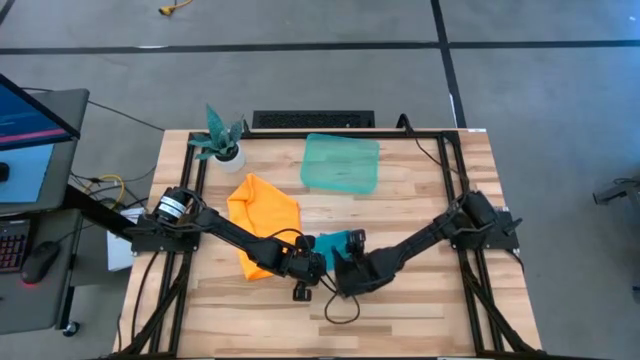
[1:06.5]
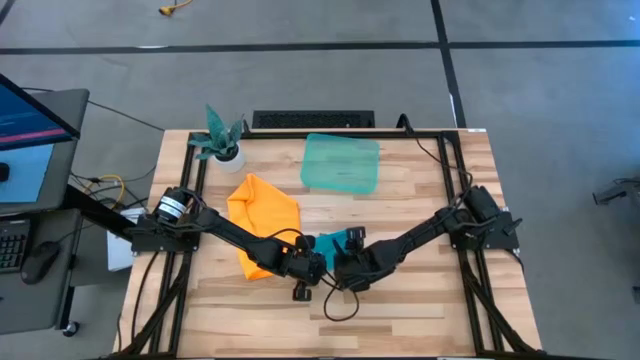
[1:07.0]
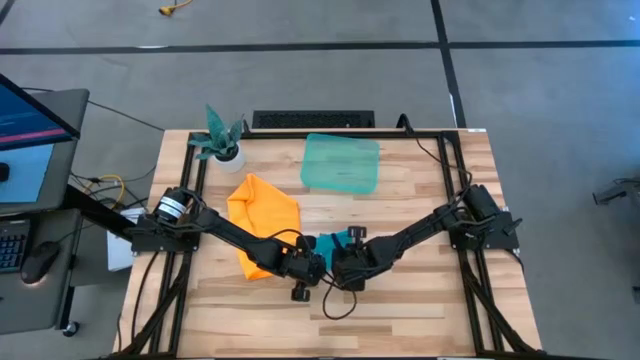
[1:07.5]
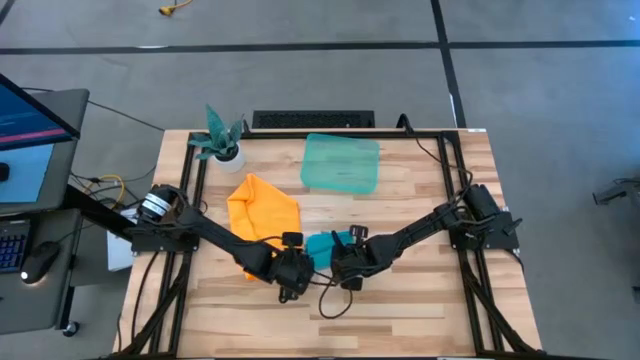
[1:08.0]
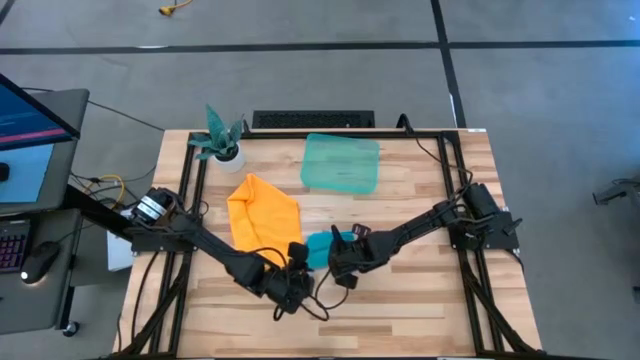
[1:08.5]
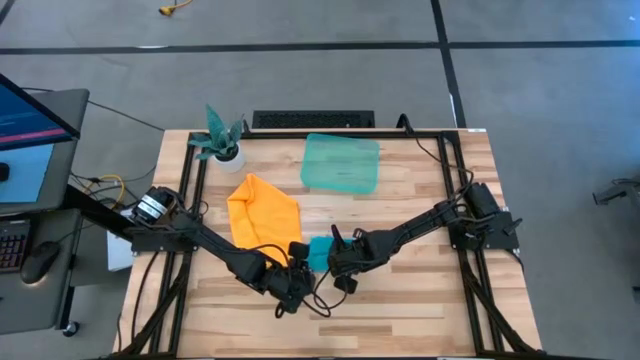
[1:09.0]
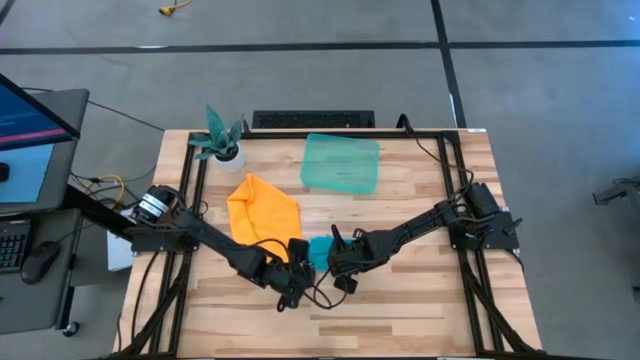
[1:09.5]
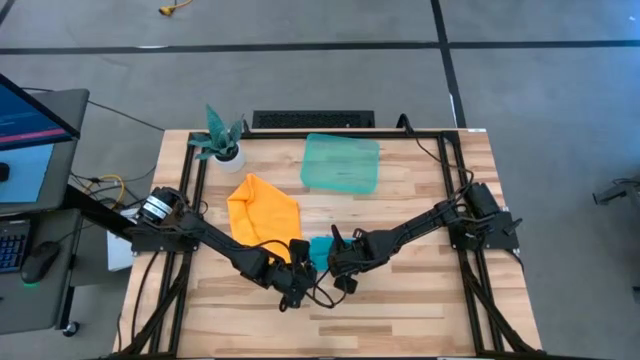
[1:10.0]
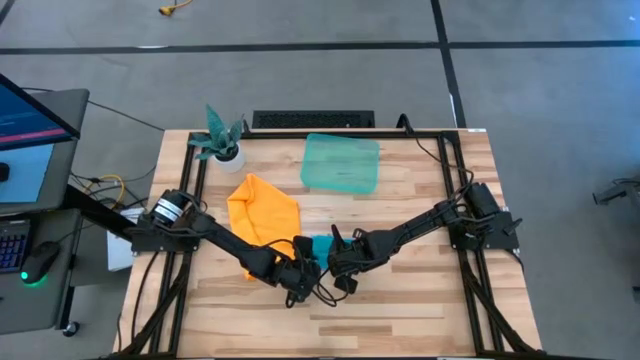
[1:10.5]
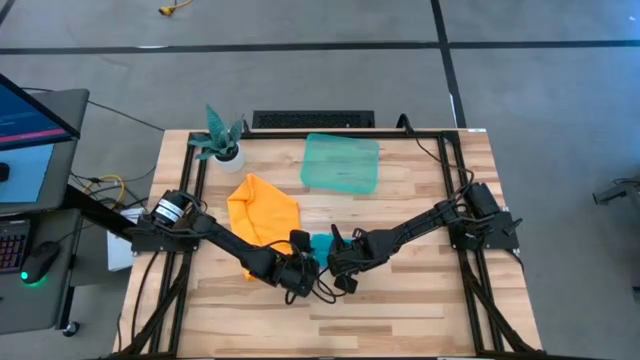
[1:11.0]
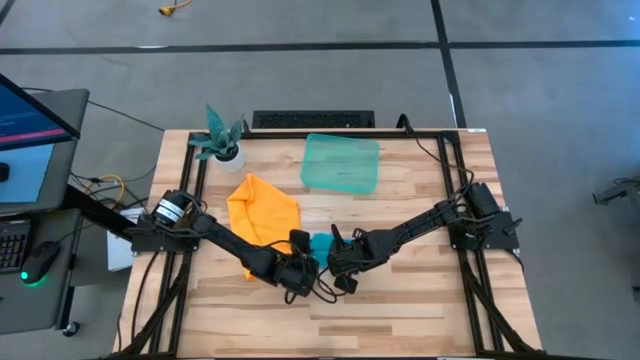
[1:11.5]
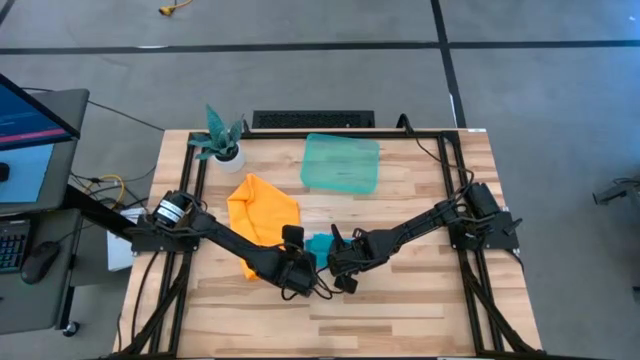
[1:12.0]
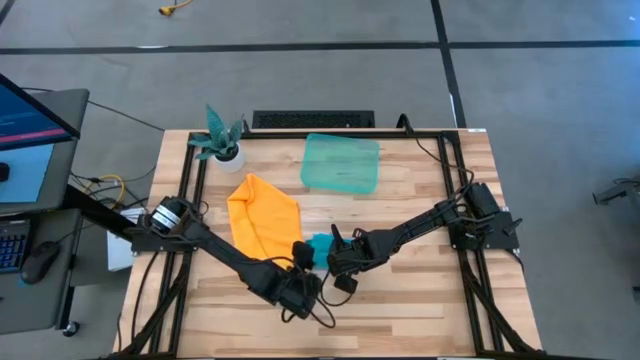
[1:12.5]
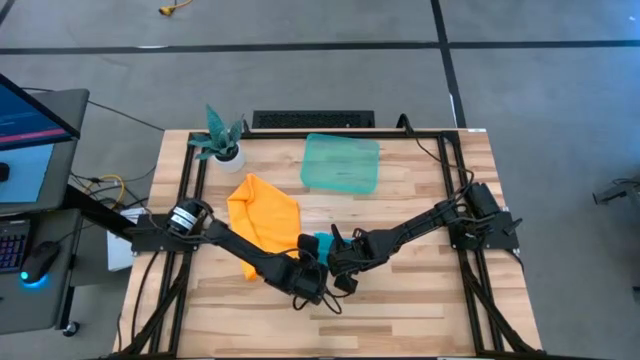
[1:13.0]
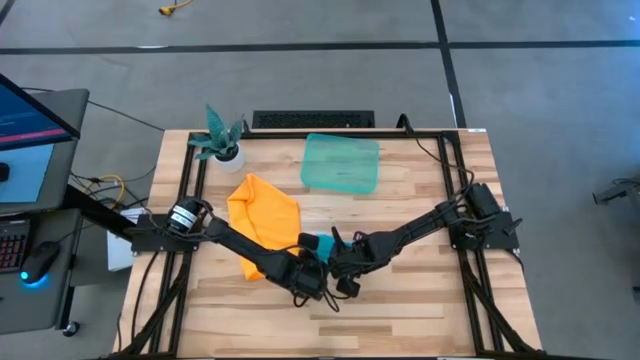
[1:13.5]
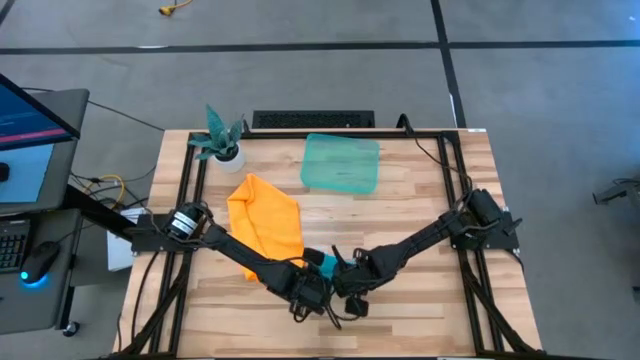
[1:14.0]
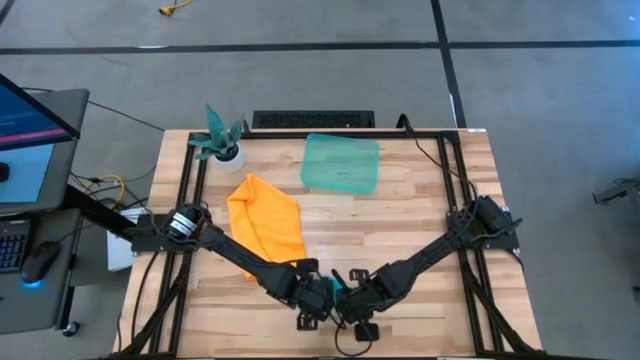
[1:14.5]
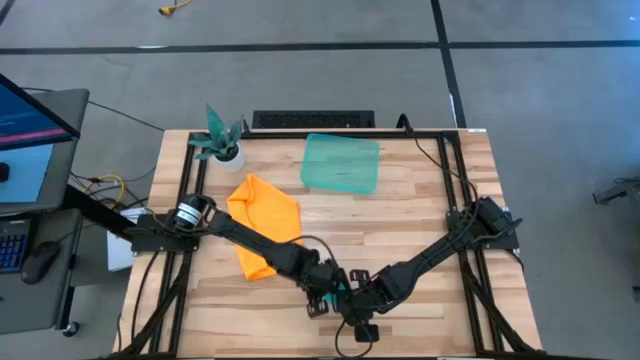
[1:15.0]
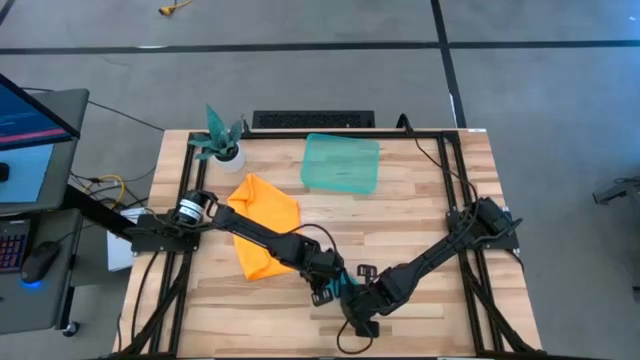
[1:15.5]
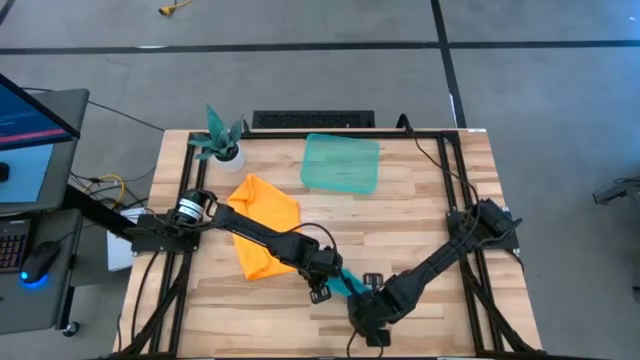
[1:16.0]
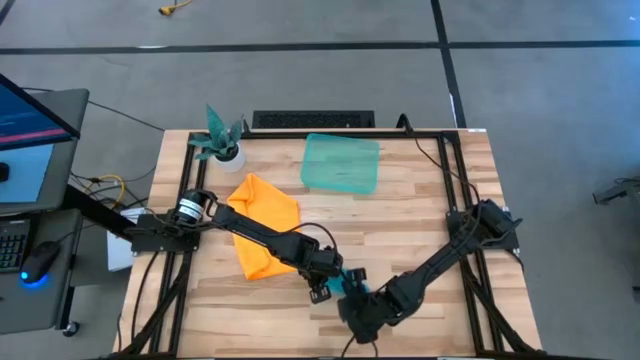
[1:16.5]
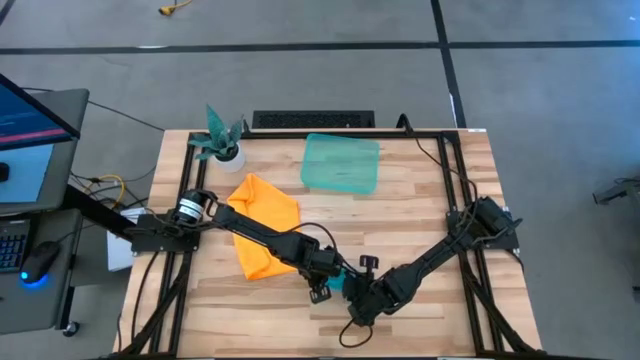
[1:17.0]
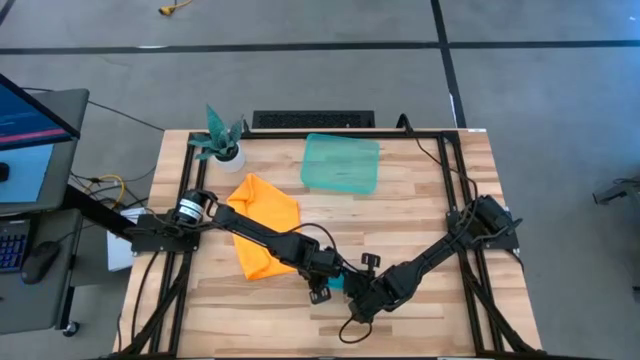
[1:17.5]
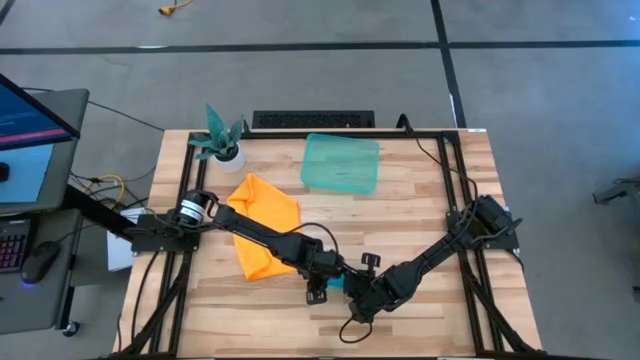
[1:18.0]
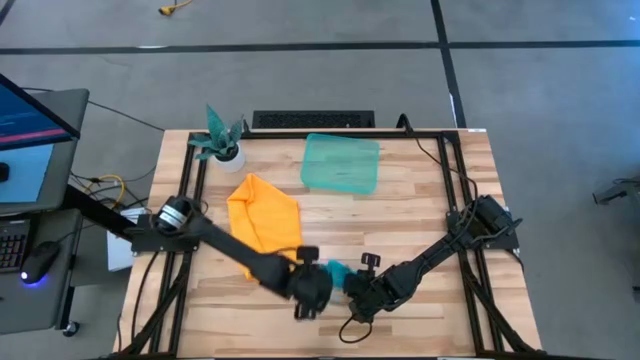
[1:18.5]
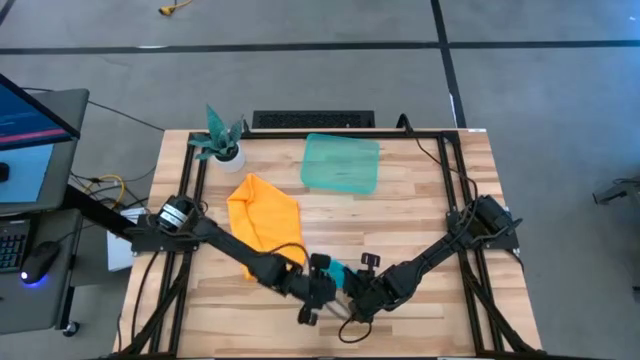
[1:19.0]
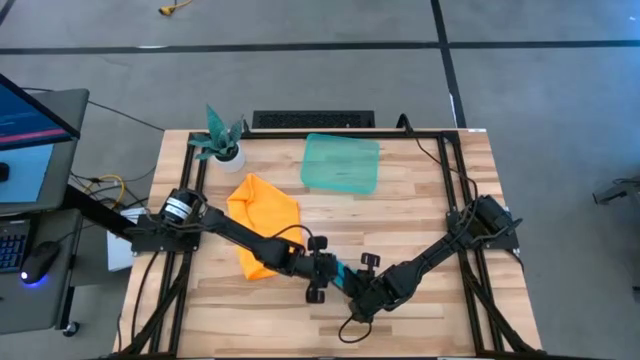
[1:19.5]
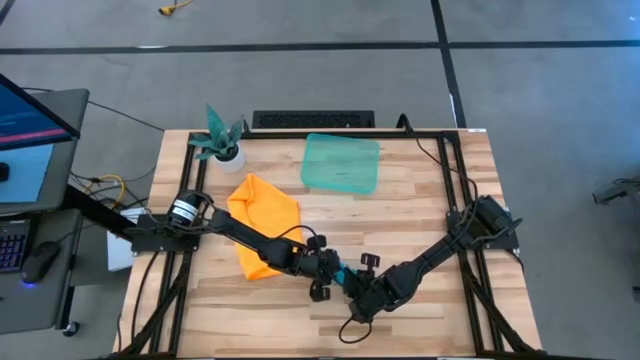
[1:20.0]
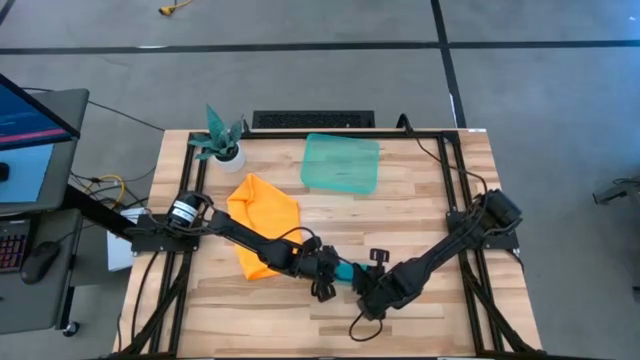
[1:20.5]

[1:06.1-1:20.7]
Task: Roll microfiber towels into tight, uniform cylinder then place into a basket
Roll the blue microfiber towel

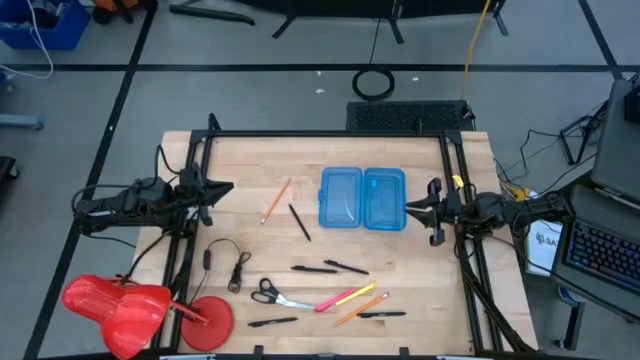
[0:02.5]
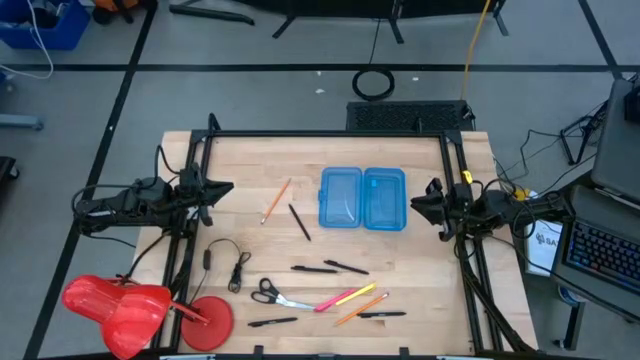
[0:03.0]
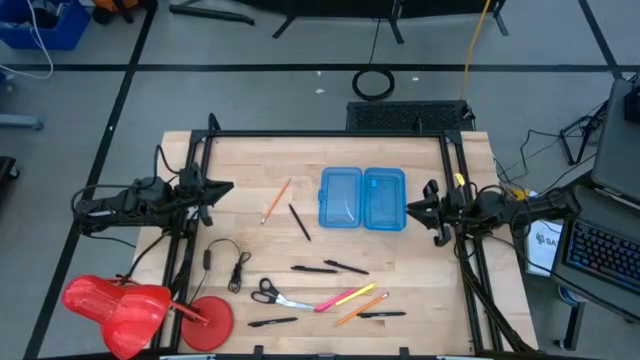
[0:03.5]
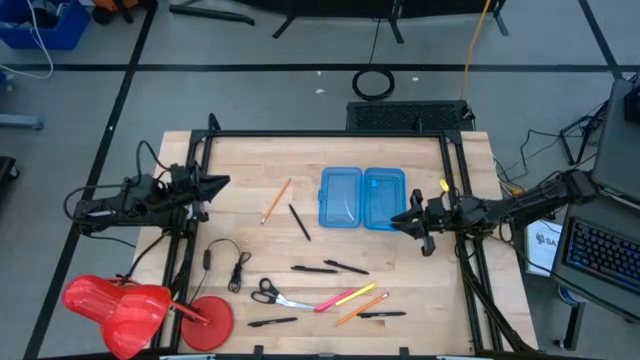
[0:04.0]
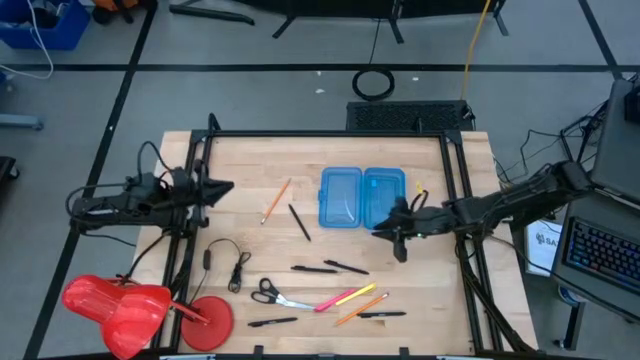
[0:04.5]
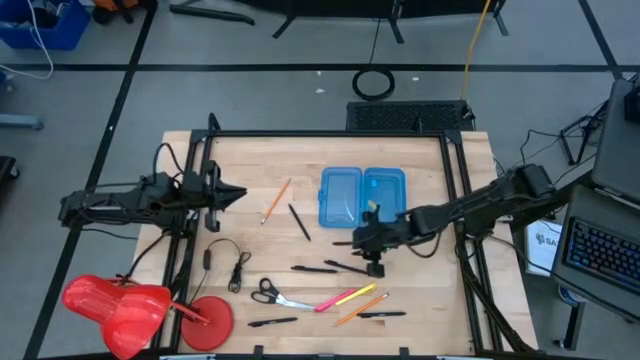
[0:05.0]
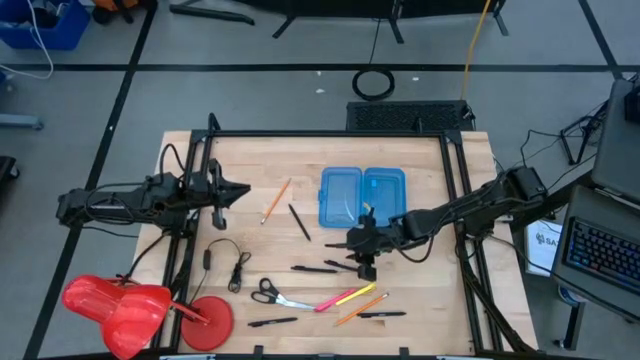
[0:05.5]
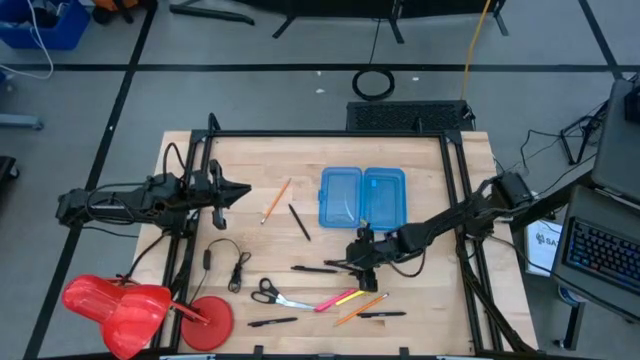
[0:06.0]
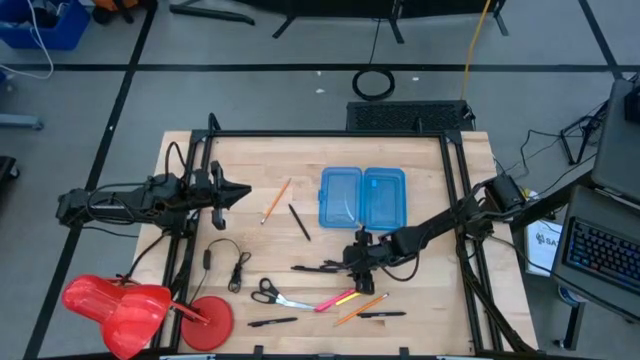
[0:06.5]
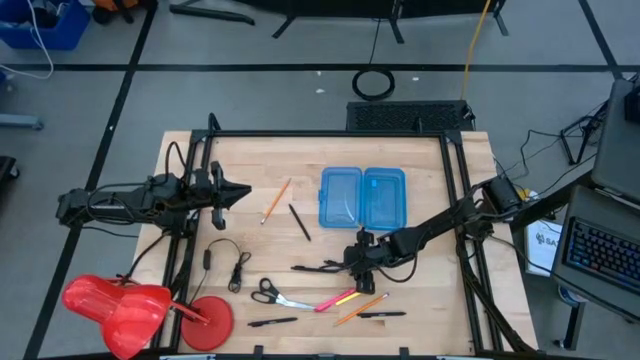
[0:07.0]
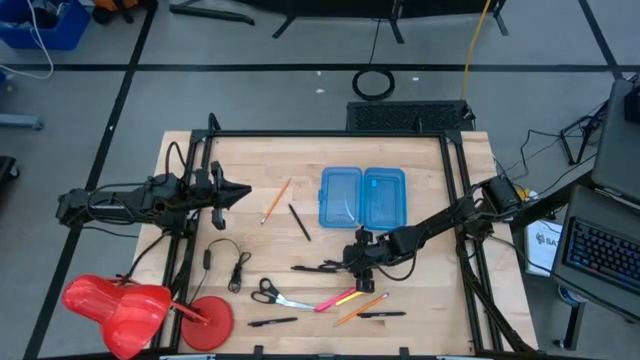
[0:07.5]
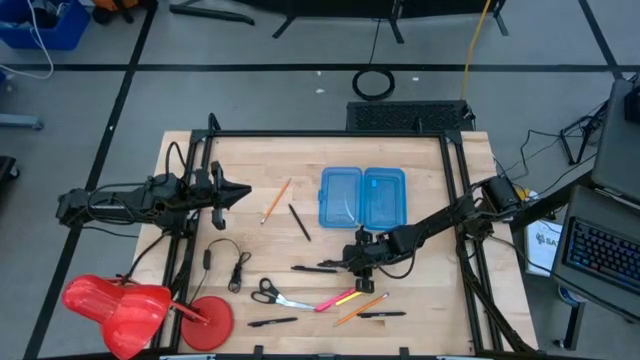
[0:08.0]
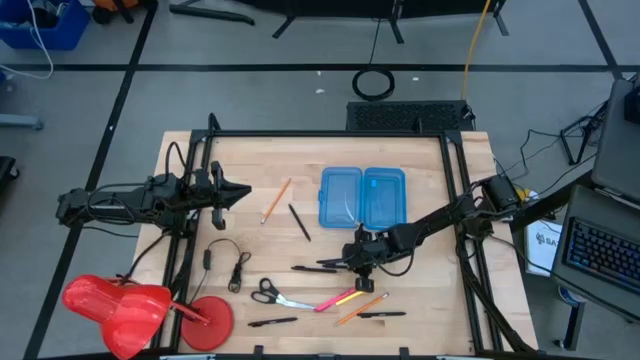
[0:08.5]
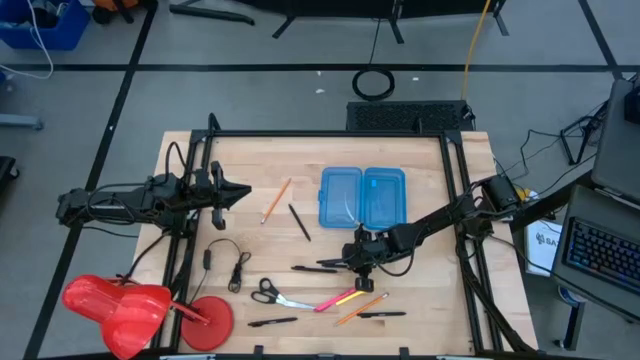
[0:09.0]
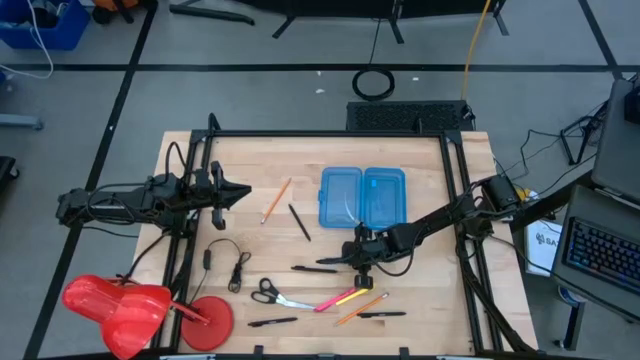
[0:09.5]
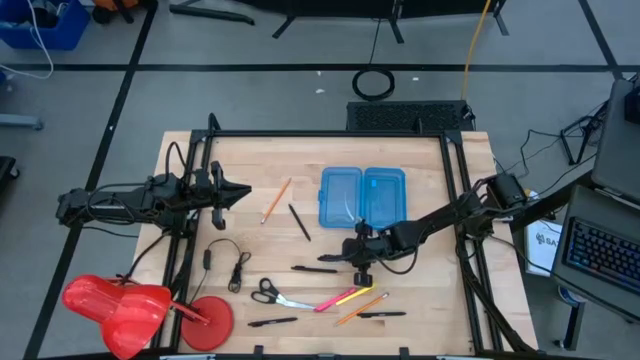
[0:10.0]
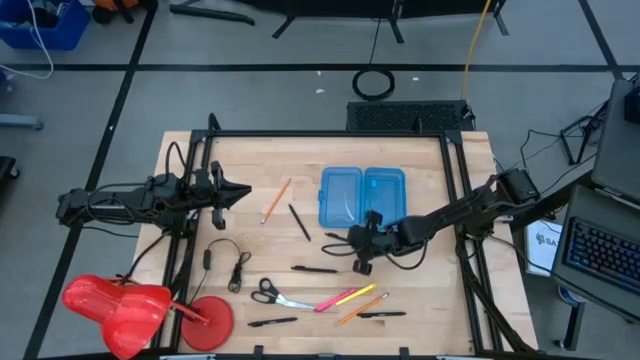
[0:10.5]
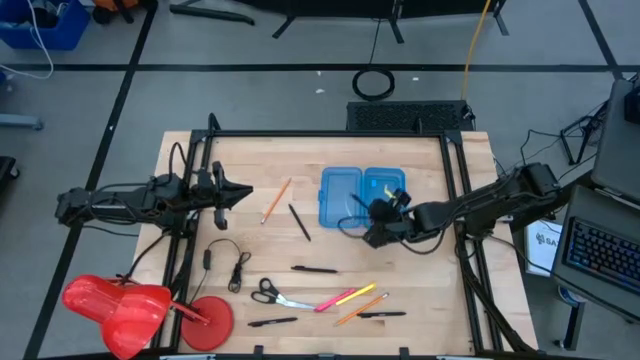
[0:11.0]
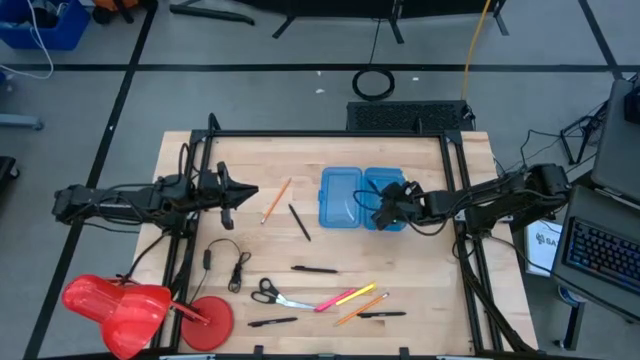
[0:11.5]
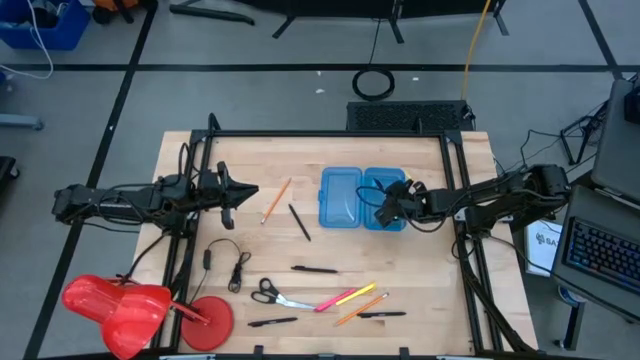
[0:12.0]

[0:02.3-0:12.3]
Task: Pick & place school supplies into a supply box
Put the black pen into the blue supply box
